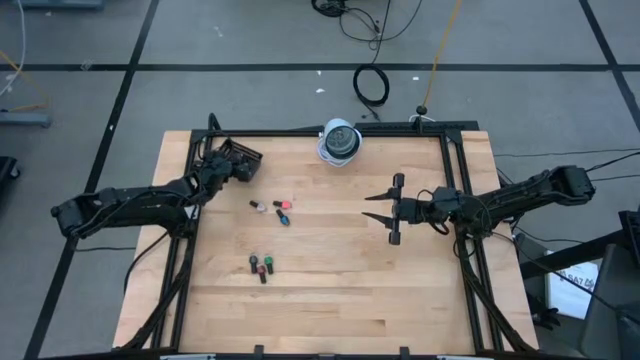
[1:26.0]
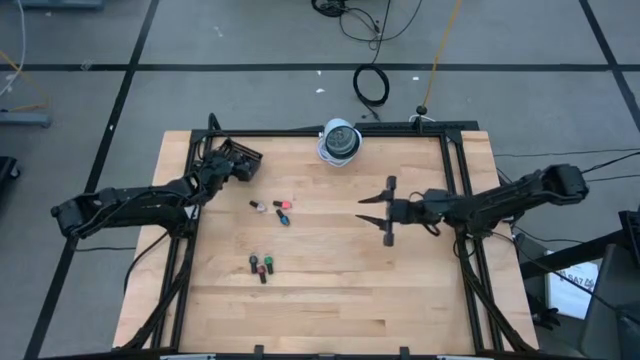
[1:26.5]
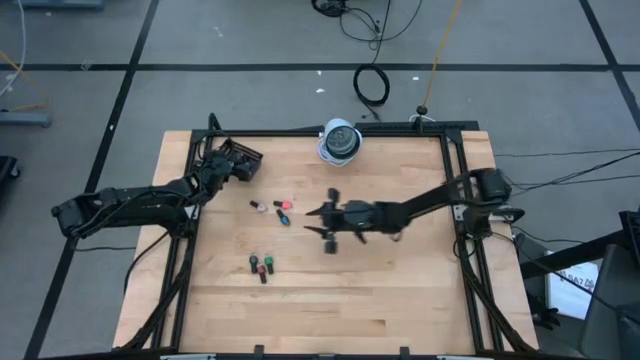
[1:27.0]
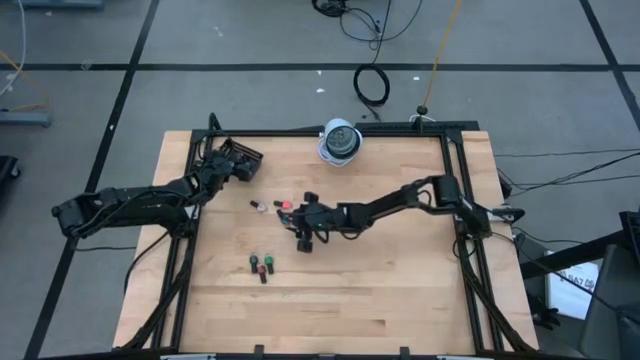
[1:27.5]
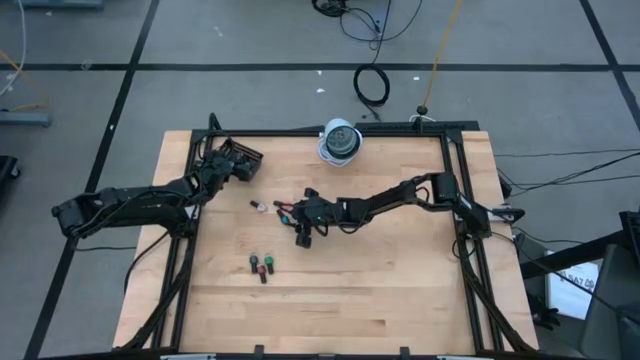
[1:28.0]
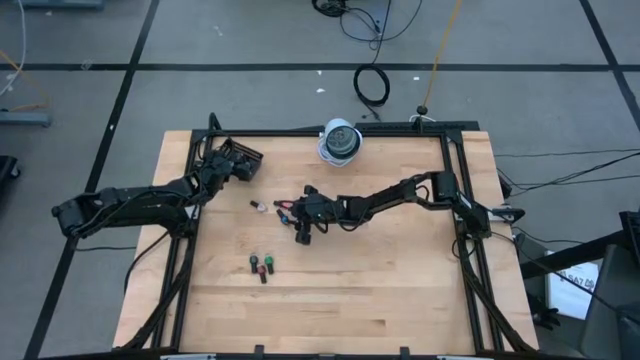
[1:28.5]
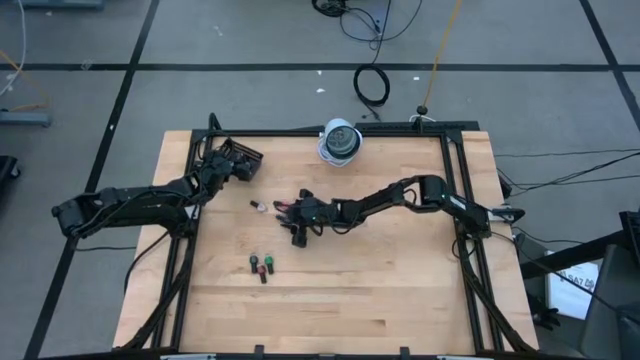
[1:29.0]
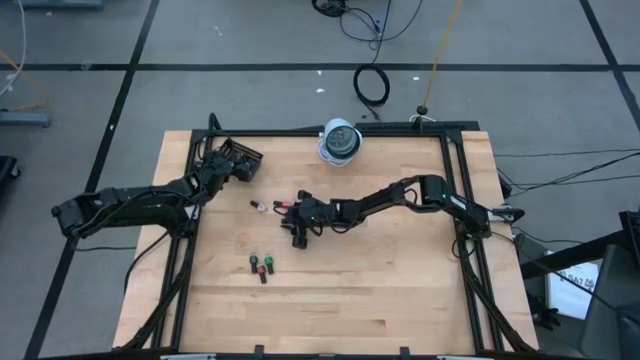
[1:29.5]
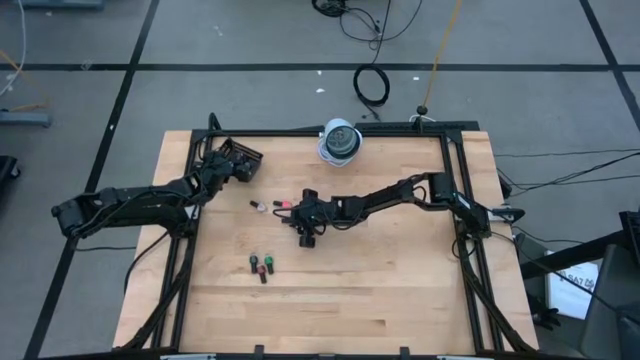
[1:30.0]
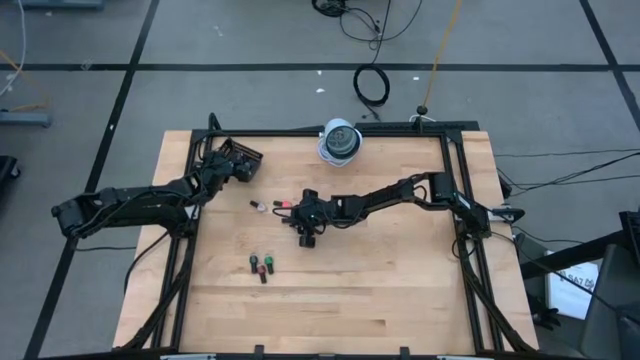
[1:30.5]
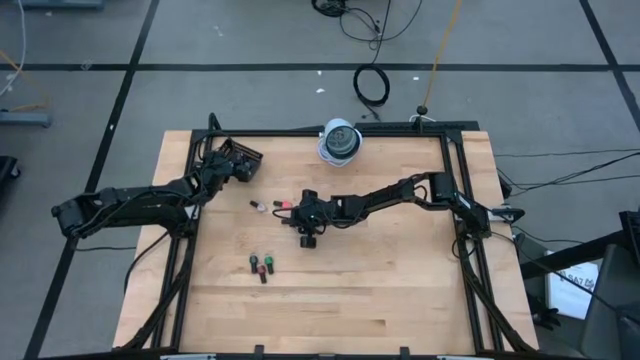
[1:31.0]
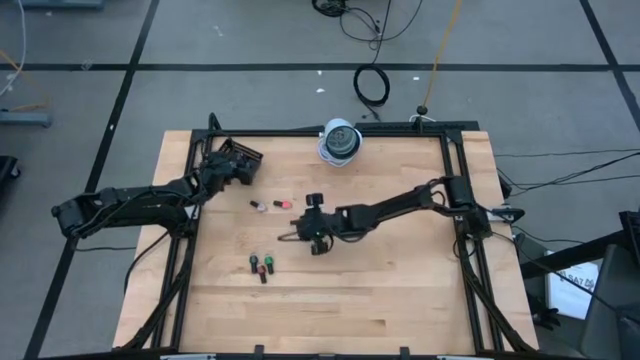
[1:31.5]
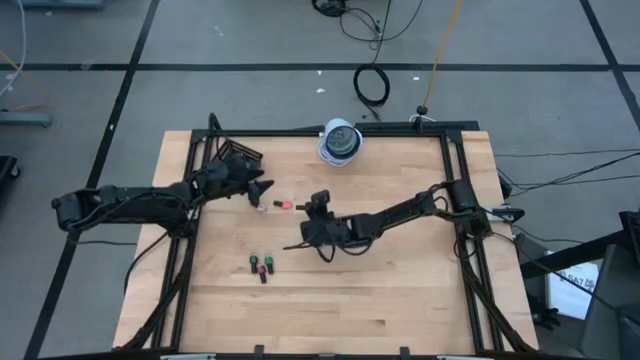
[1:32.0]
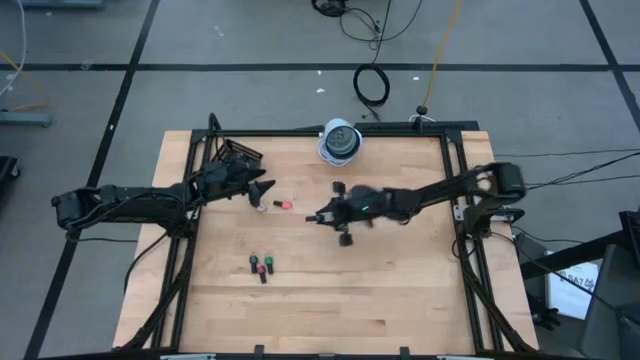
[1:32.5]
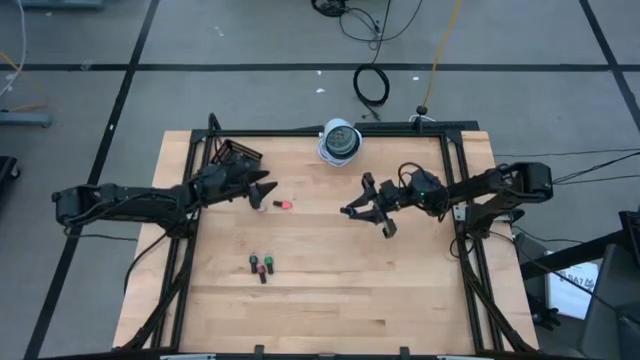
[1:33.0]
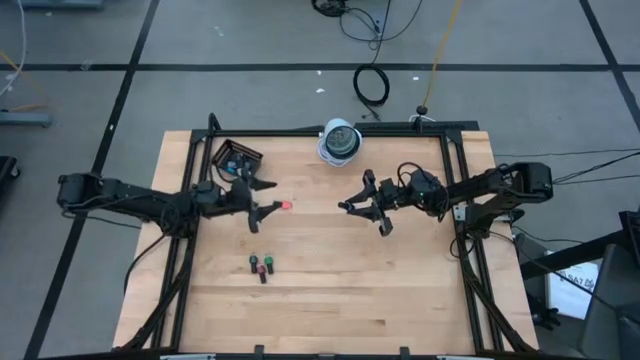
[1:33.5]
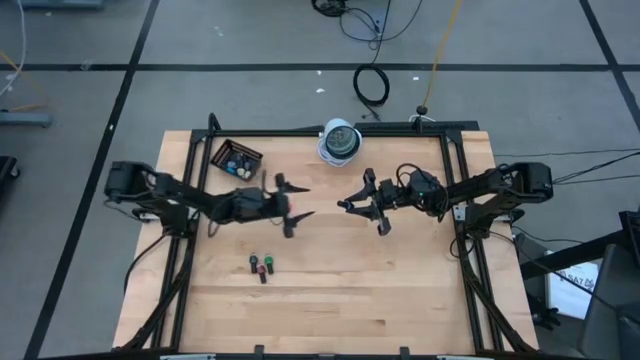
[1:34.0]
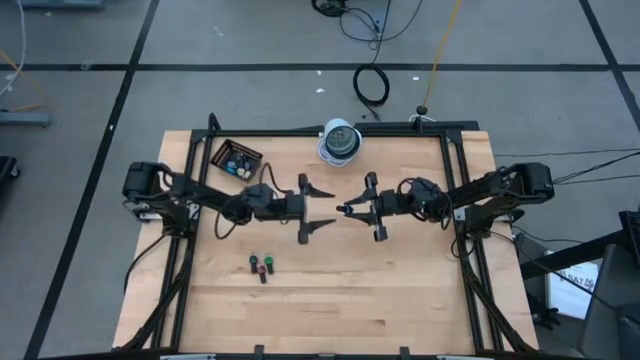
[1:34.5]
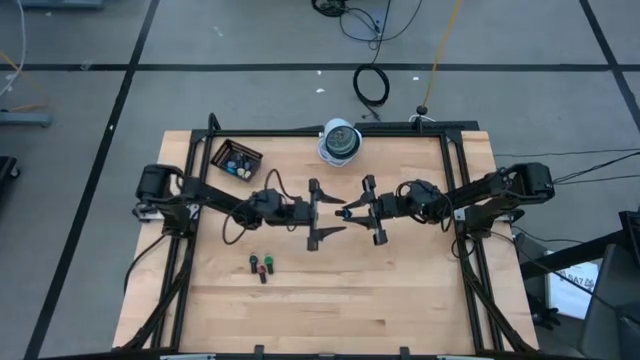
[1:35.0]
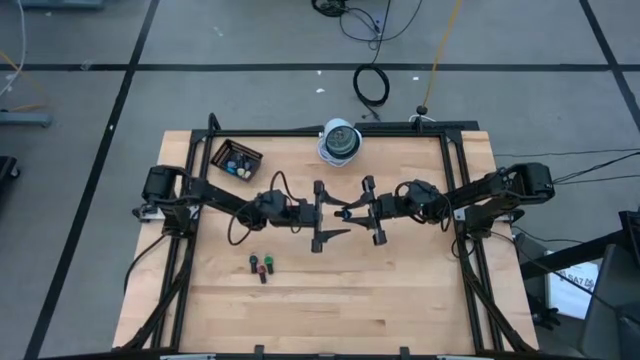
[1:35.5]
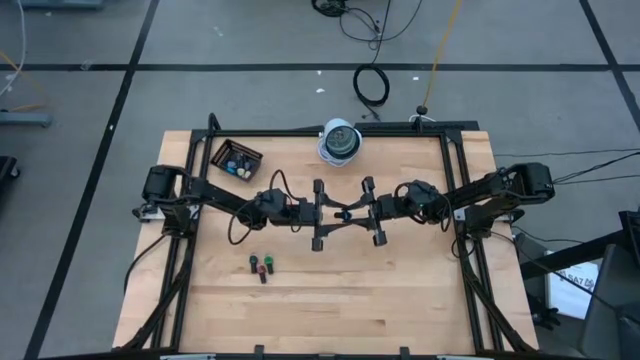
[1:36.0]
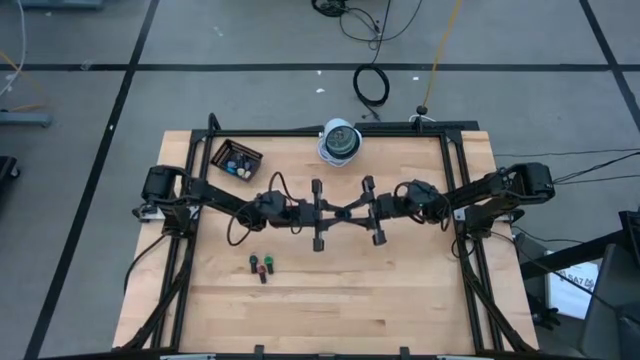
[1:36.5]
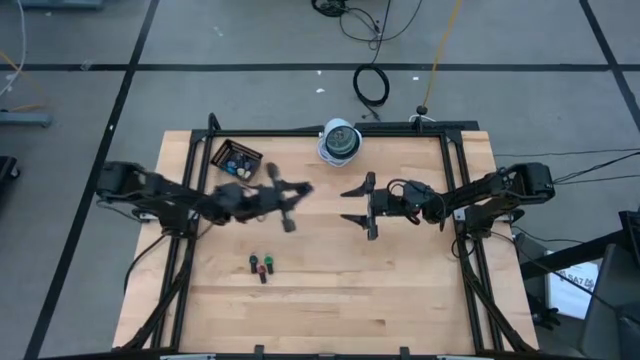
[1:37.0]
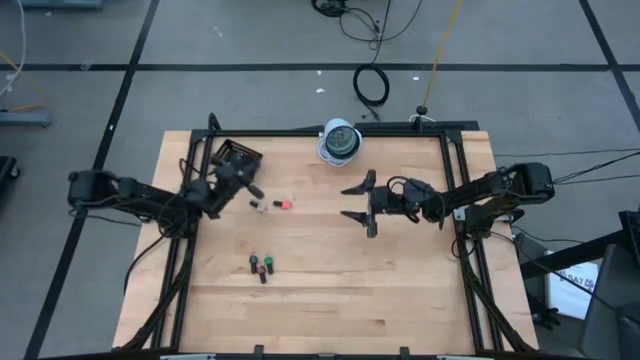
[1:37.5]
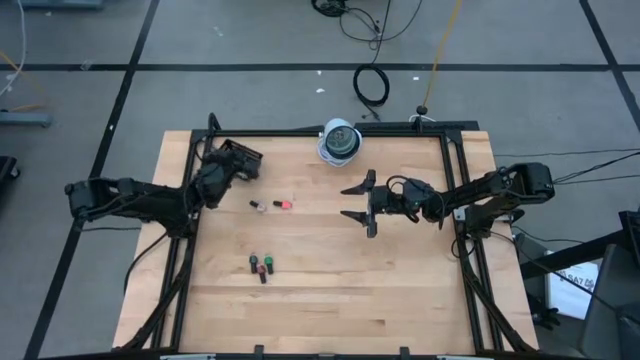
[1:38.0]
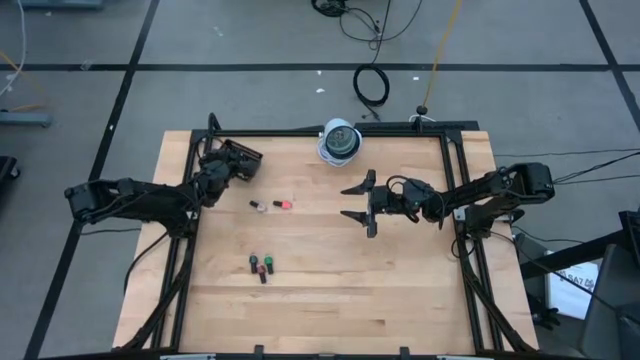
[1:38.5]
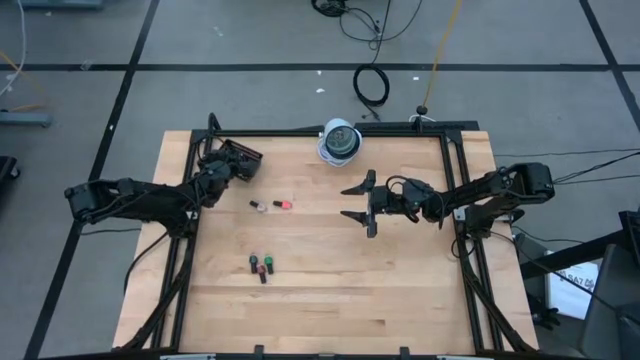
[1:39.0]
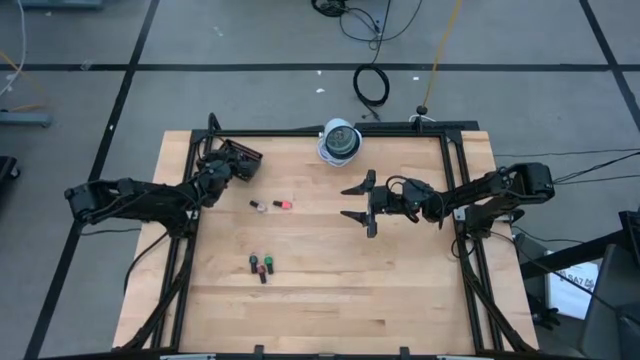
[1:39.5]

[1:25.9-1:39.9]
Task: Pick & Place Nail Polish
Put the dark blue nail polish bottle into the black basket

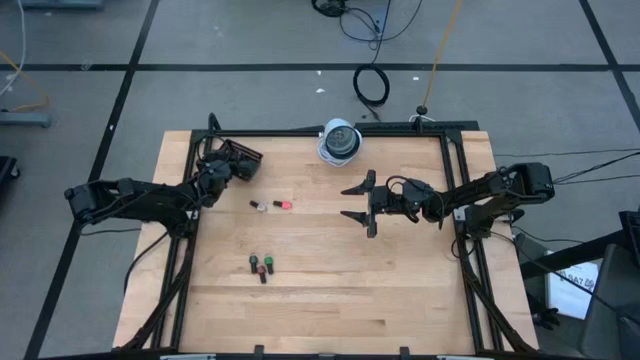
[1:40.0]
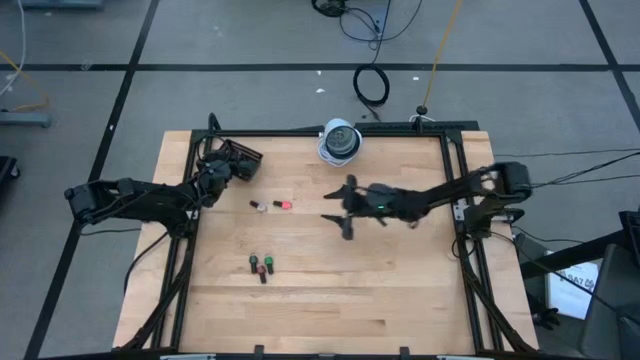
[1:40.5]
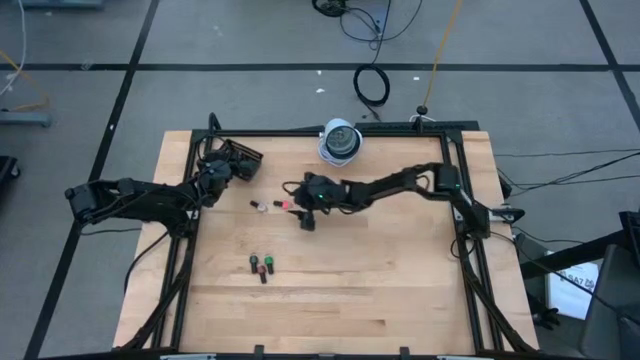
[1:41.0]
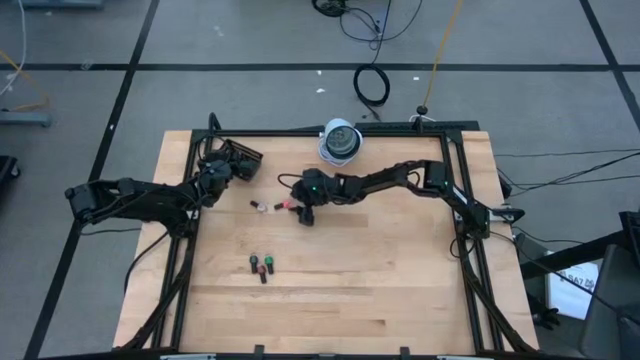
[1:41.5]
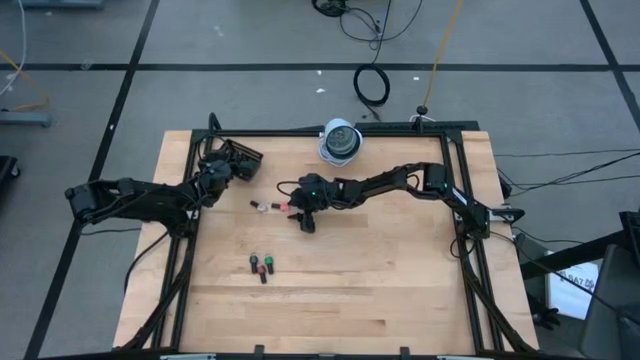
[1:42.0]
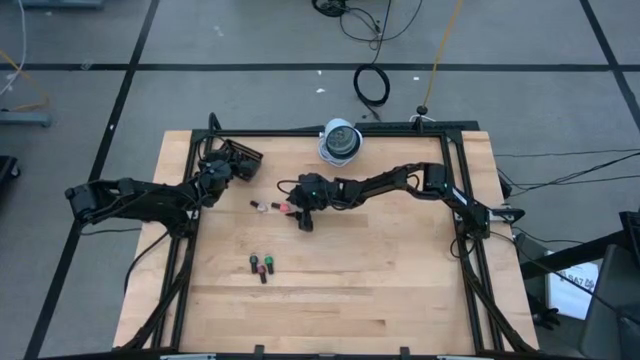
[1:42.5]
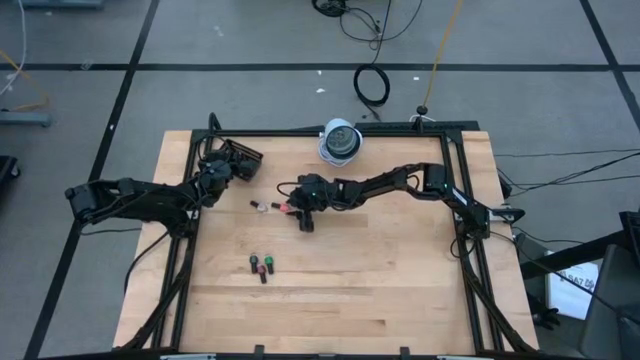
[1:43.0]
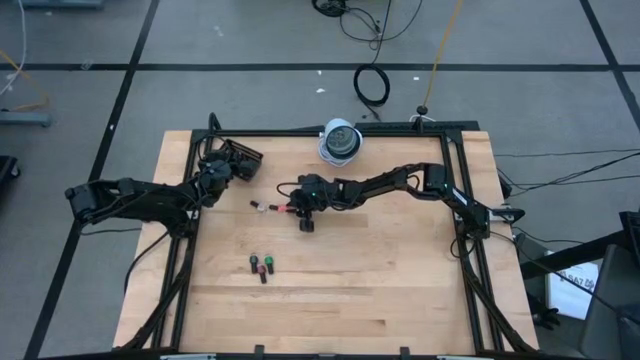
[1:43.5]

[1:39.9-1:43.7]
Put the pink nail polish bottle into the black basket

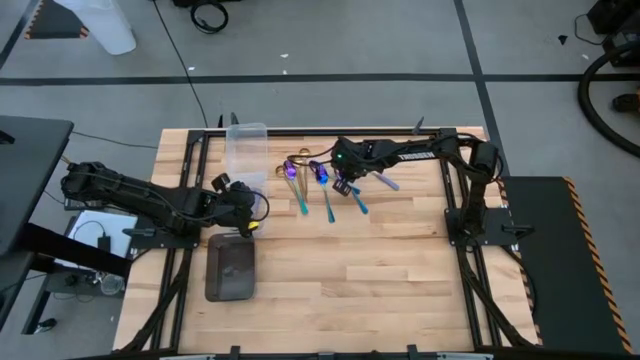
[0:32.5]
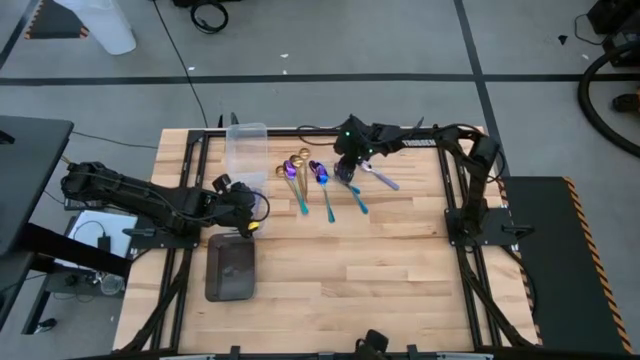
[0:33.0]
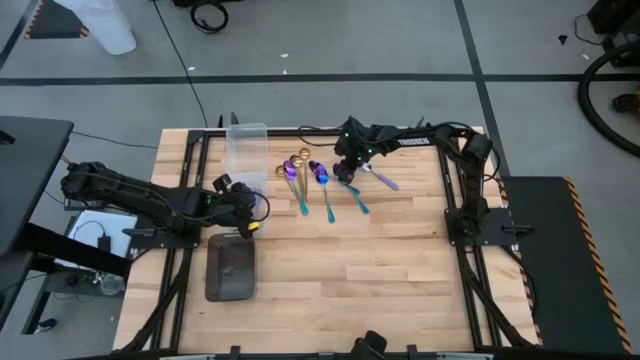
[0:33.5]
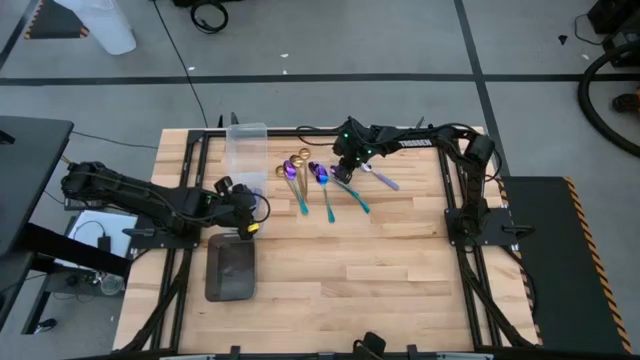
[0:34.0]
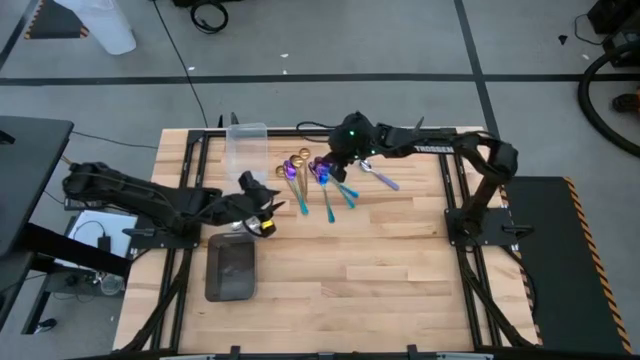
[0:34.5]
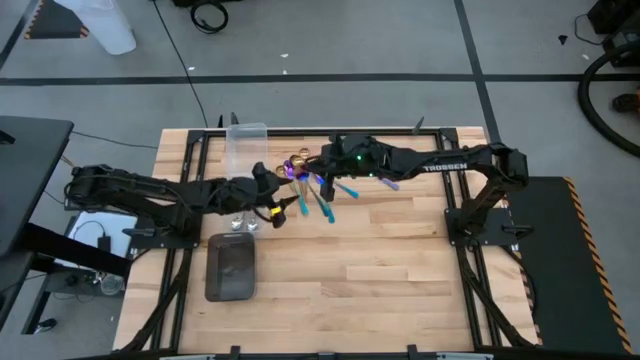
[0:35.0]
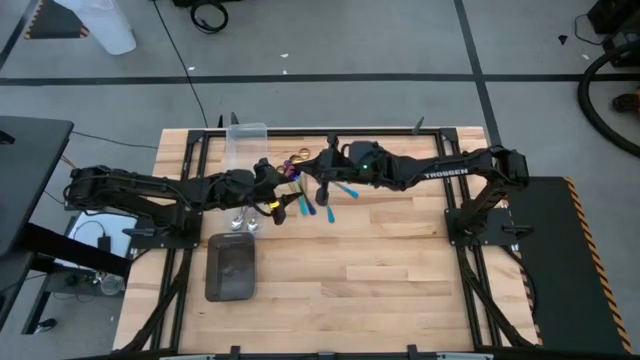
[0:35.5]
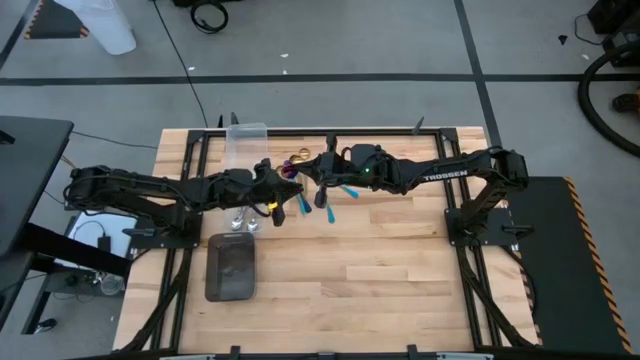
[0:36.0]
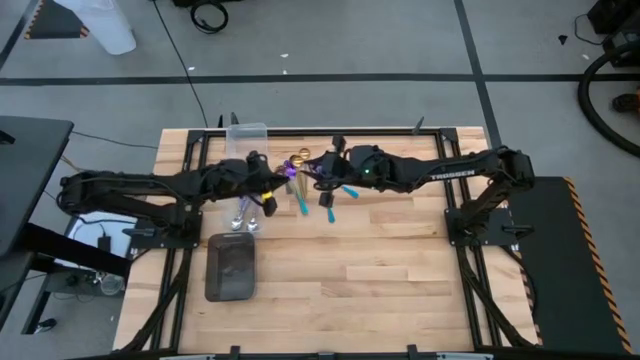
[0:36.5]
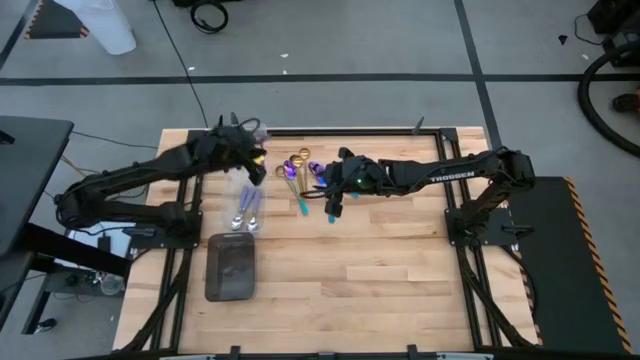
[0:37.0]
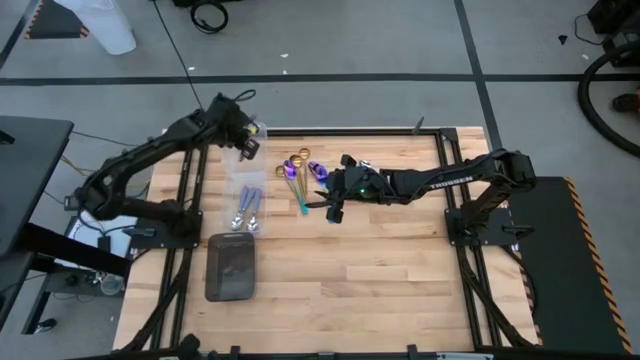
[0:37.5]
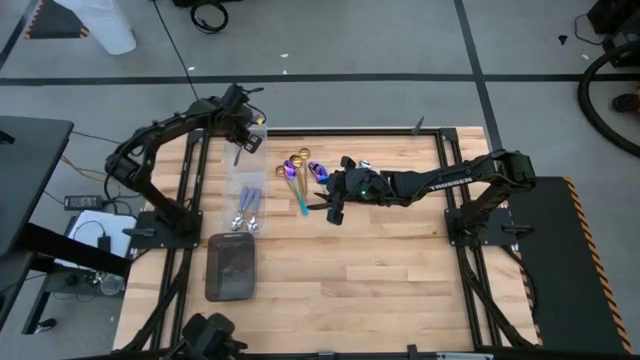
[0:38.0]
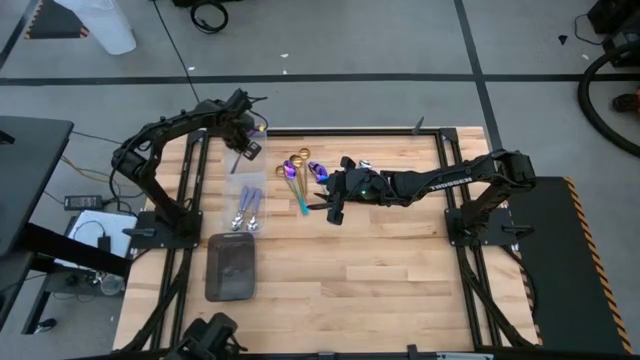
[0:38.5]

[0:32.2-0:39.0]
Task: Sort silverware by color (type)
Put the purple spoon into the top transparent bin
